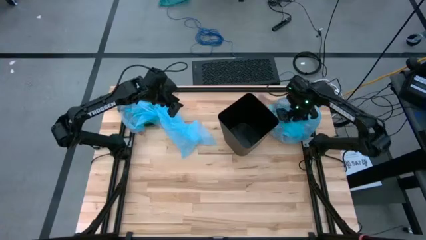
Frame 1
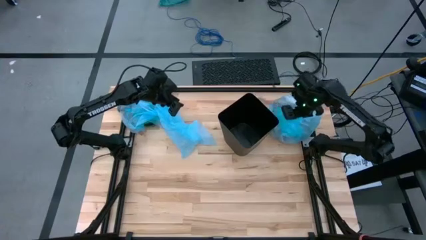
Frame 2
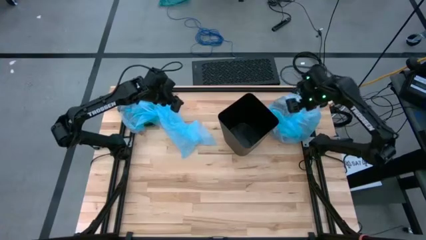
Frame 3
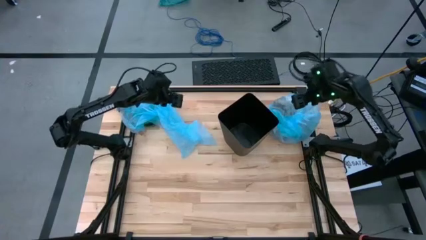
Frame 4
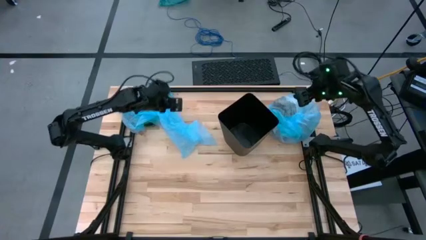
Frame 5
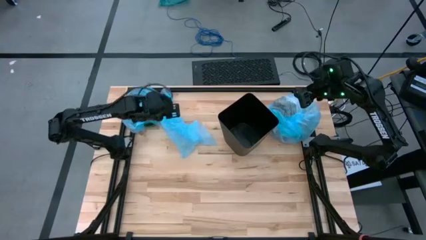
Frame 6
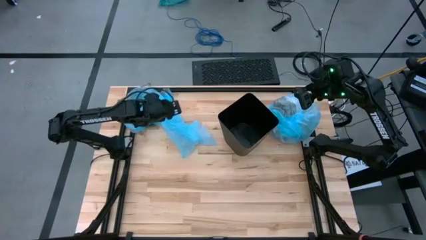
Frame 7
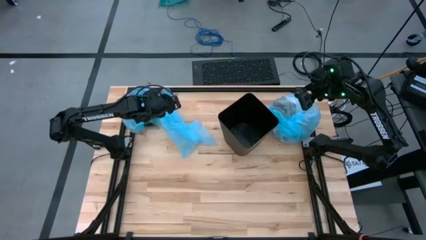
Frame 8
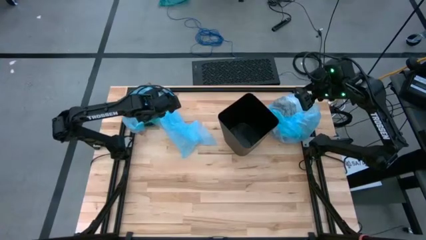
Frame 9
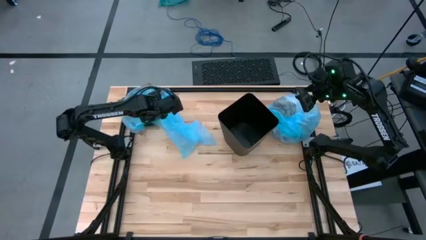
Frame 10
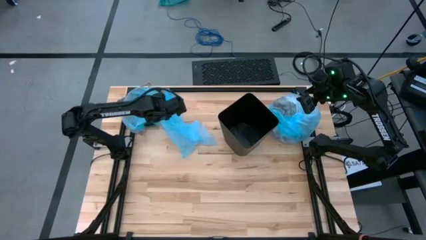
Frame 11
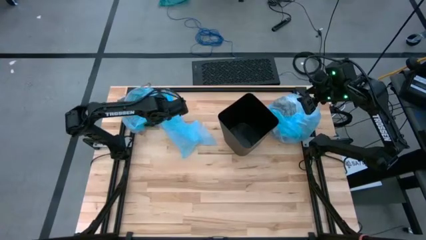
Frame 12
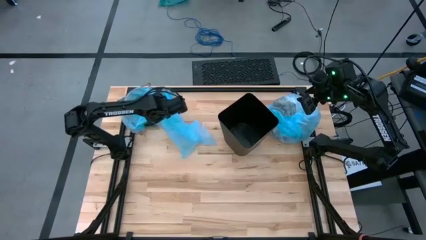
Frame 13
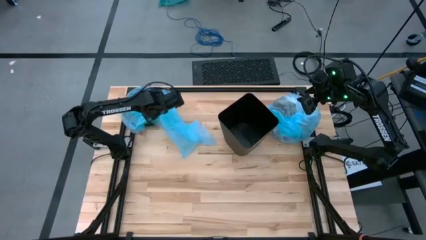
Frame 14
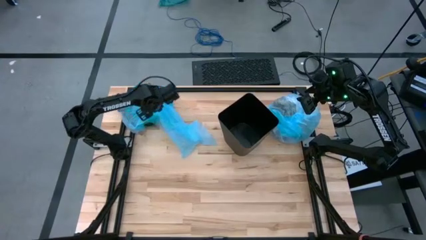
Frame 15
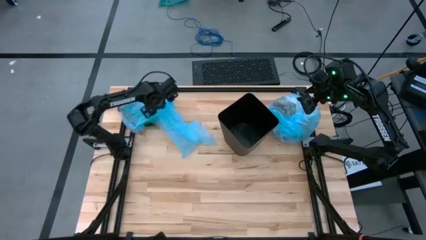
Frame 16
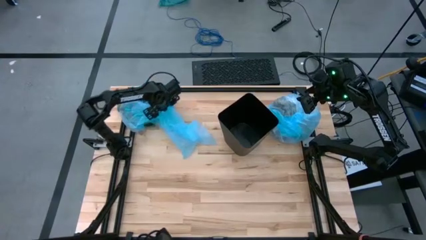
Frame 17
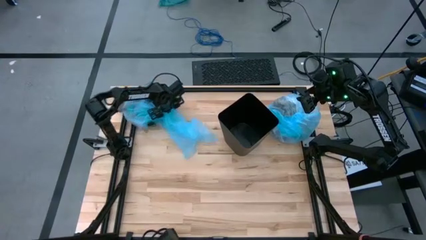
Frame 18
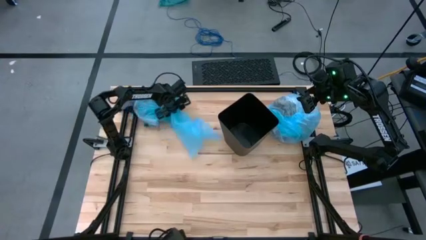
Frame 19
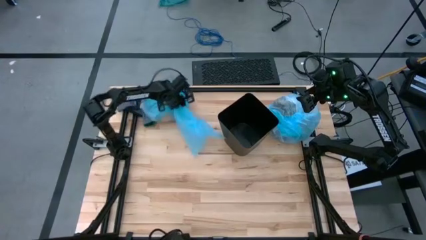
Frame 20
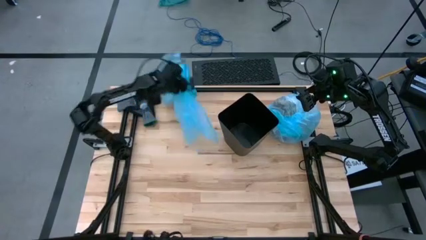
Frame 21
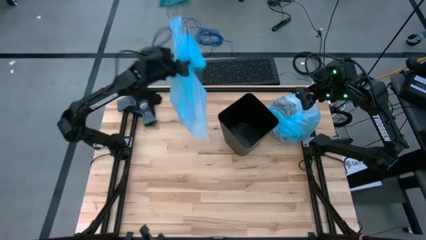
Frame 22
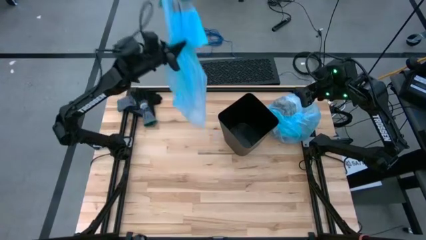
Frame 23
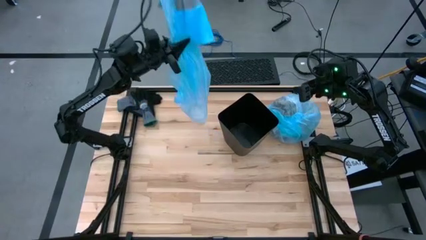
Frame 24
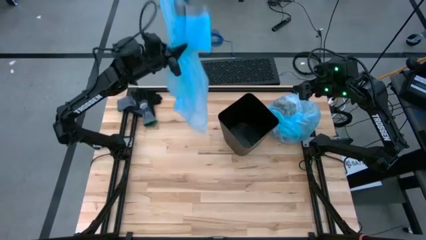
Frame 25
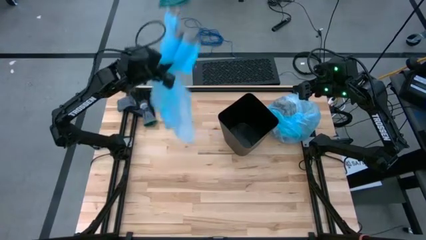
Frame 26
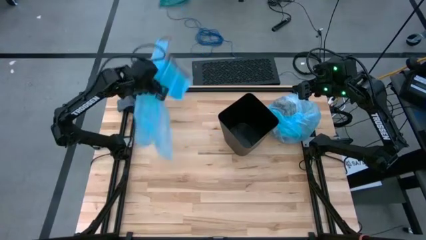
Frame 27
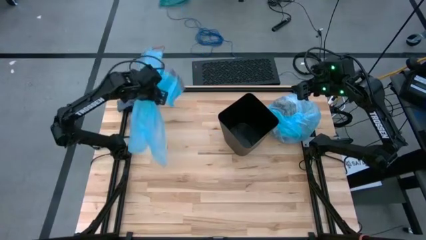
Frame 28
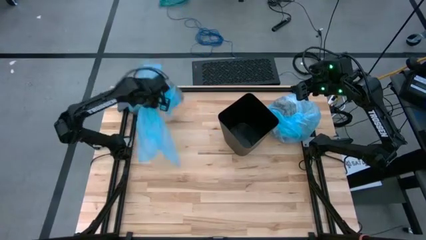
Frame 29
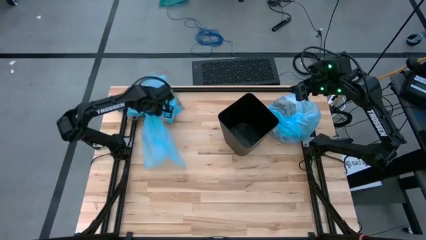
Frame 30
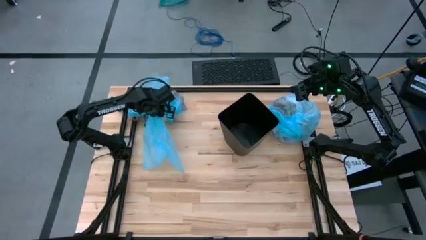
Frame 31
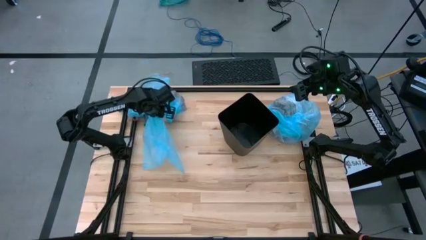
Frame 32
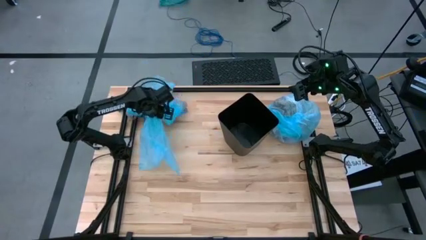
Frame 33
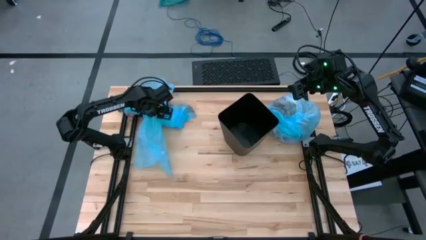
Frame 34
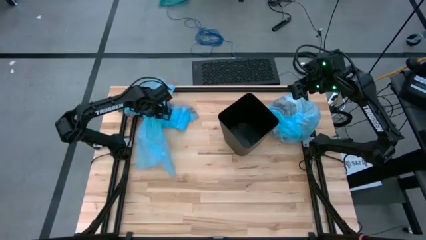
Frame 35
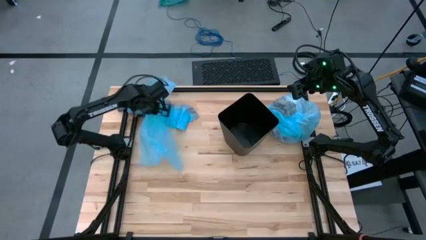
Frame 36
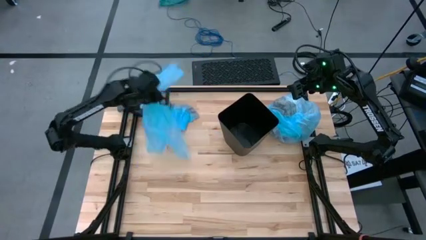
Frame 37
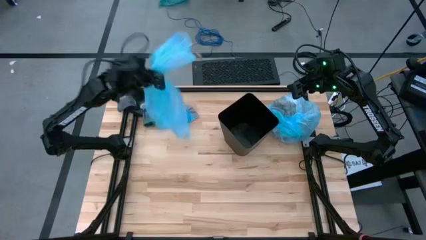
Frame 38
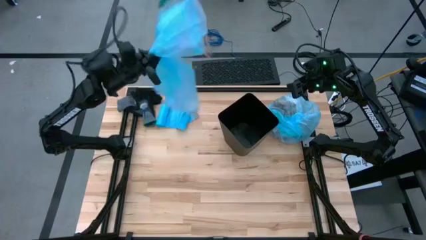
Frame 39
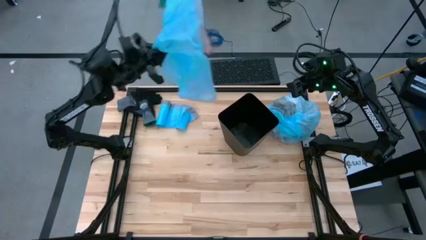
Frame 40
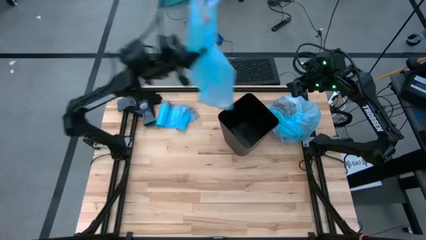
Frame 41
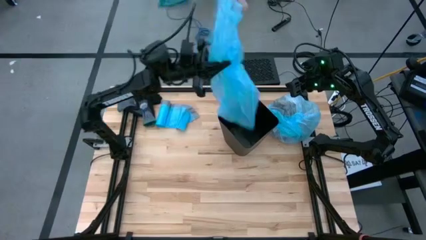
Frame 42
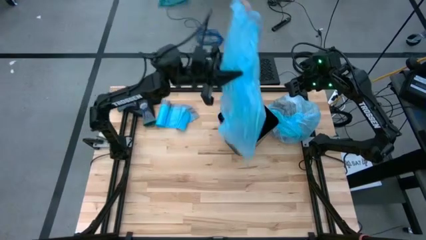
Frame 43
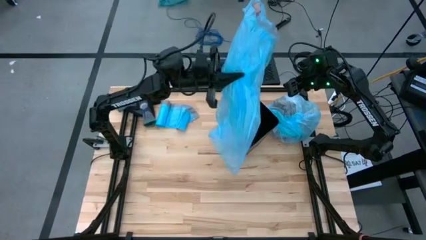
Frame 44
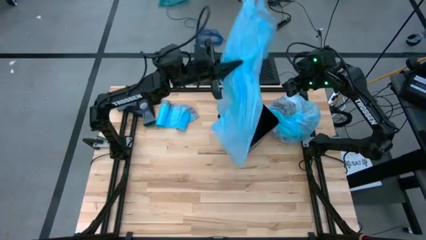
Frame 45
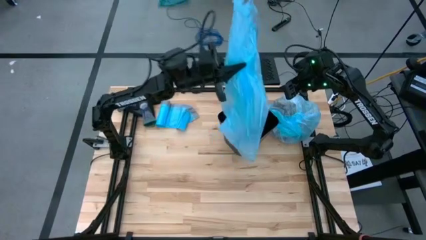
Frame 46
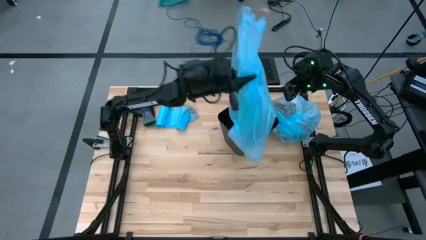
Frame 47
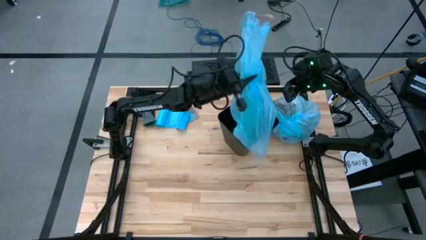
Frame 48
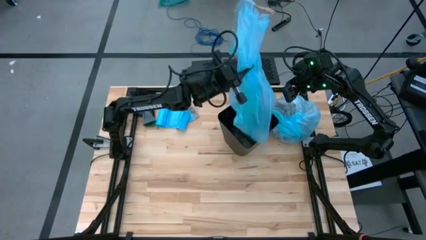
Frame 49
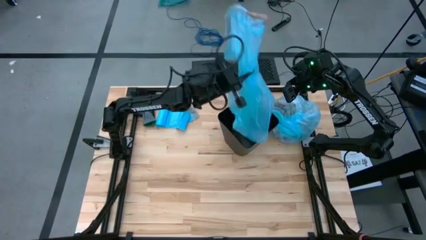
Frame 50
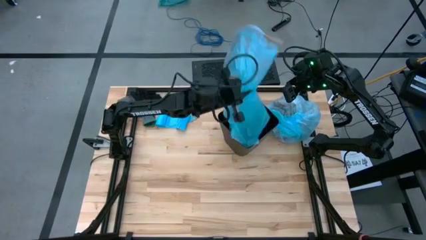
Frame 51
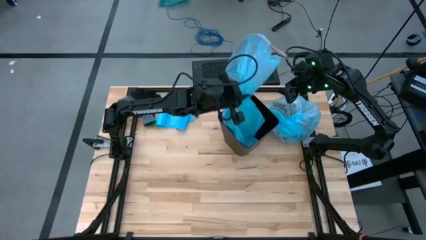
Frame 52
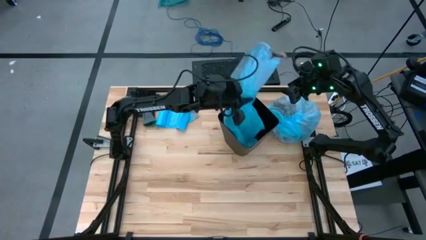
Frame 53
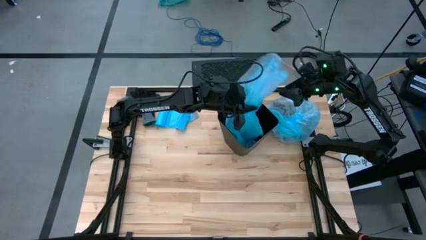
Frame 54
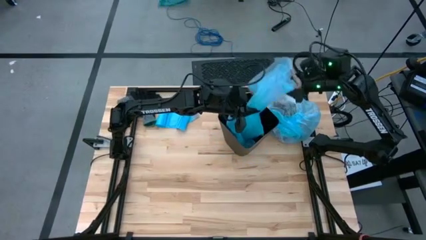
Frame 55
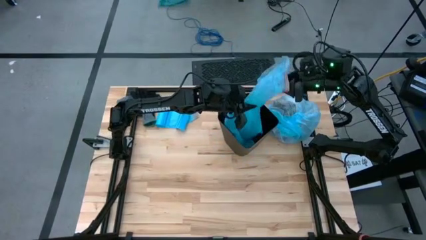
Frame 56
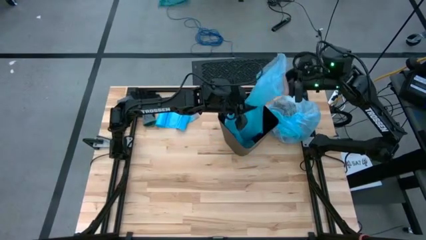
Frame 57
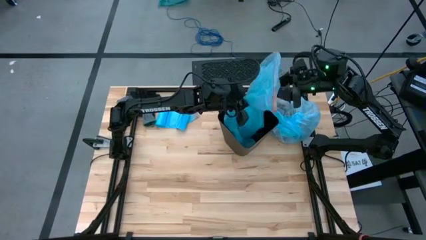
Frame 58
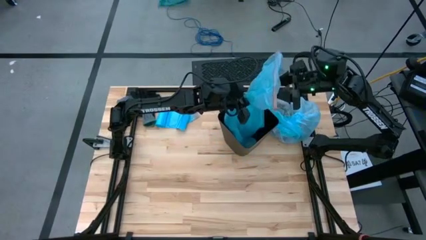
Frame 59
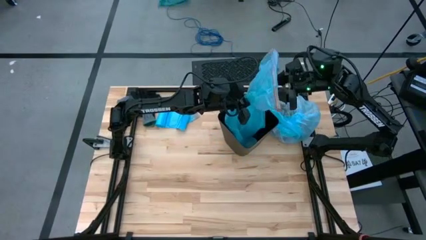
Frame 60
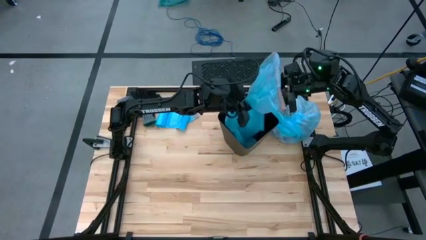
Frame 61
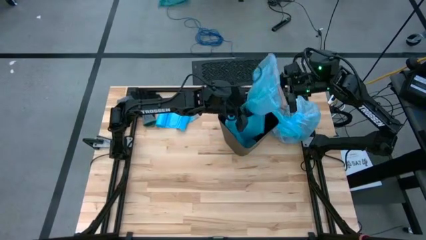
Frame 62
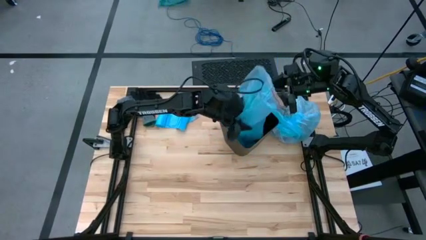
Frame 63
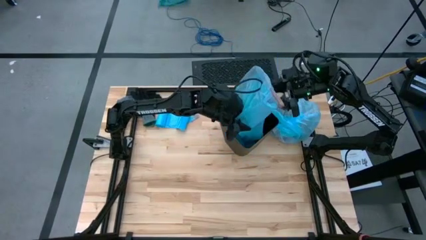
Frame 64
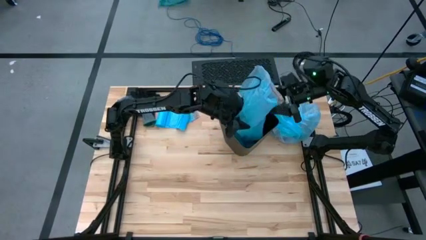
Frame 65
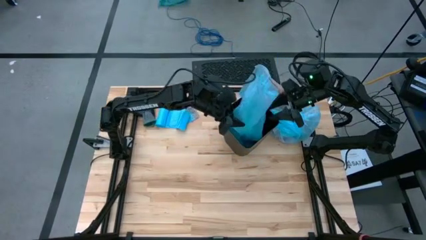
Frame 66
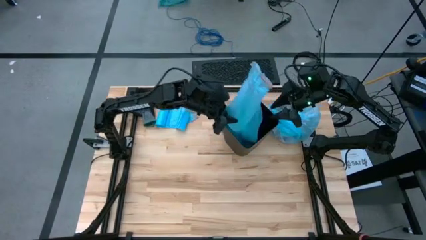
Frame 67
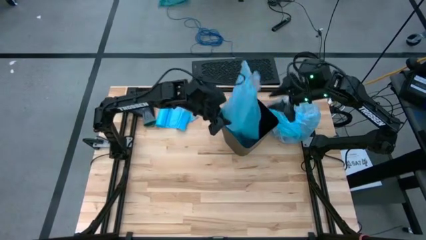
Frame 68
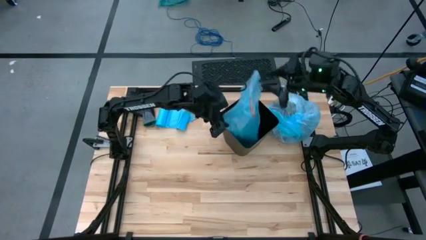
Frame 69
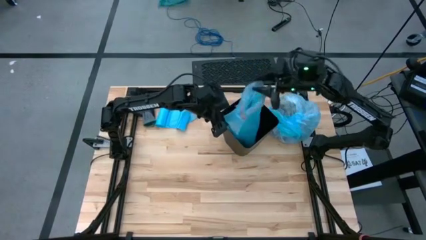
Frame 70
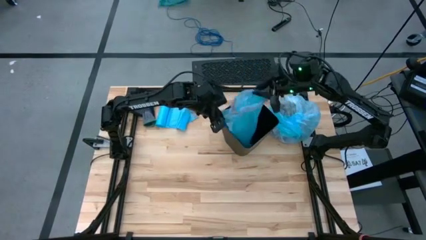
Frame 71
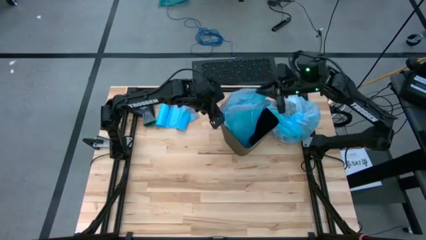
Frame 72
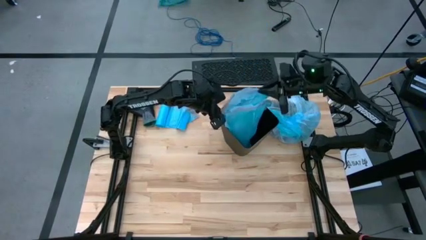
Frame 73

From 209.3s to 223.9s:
Task: place trash/remove bag and relplace
Put the blue trash bag into the trash bin
